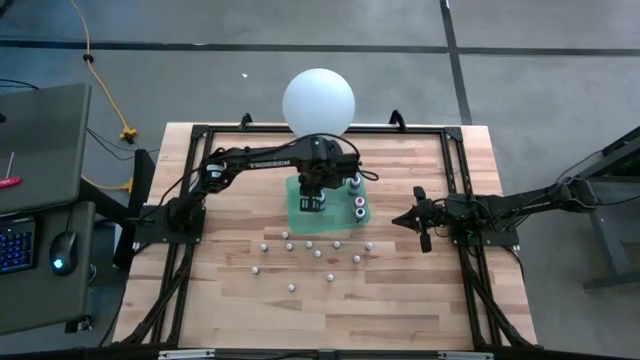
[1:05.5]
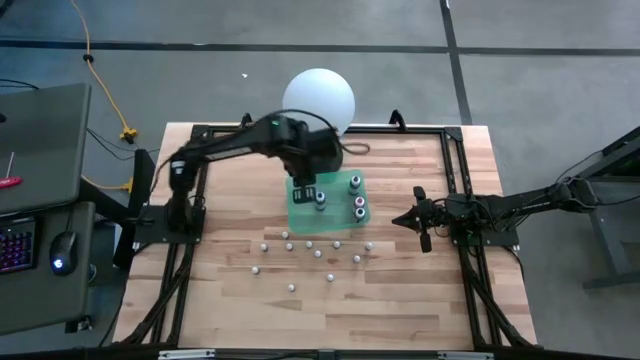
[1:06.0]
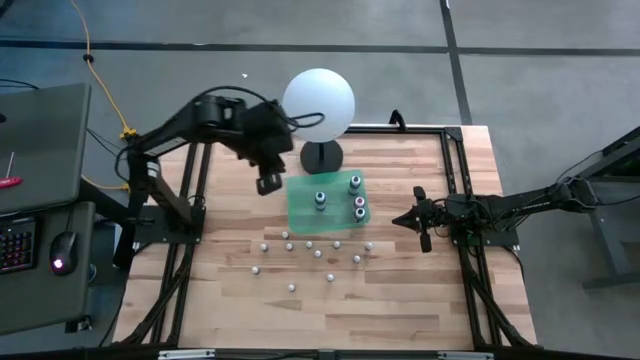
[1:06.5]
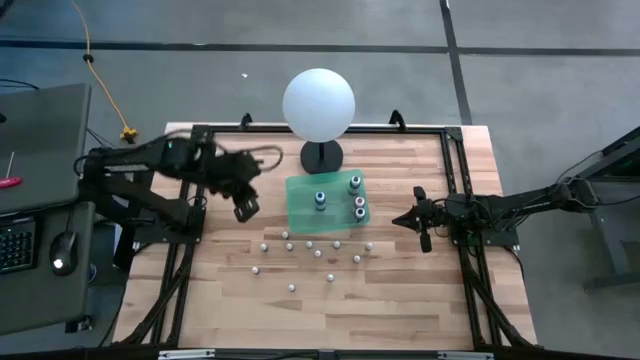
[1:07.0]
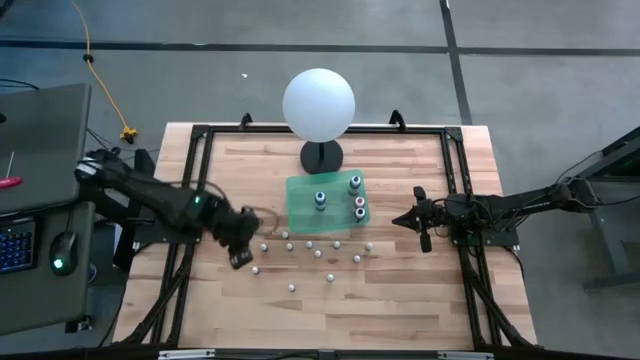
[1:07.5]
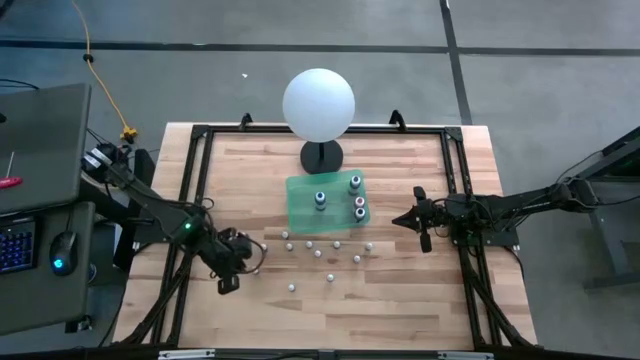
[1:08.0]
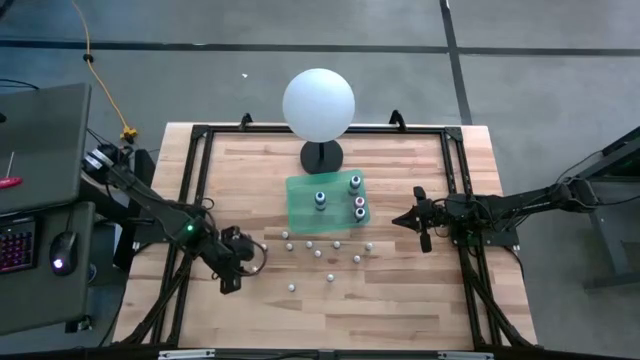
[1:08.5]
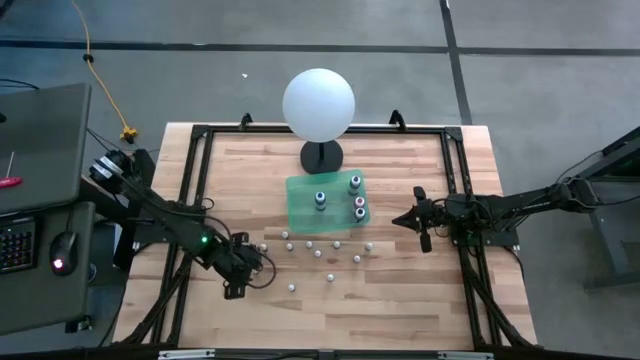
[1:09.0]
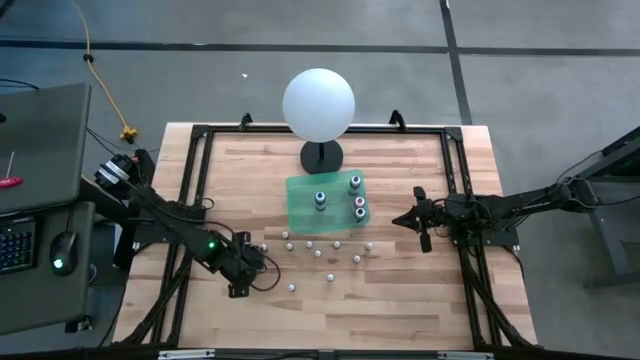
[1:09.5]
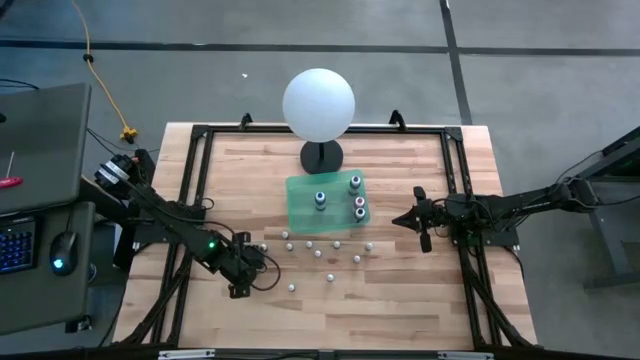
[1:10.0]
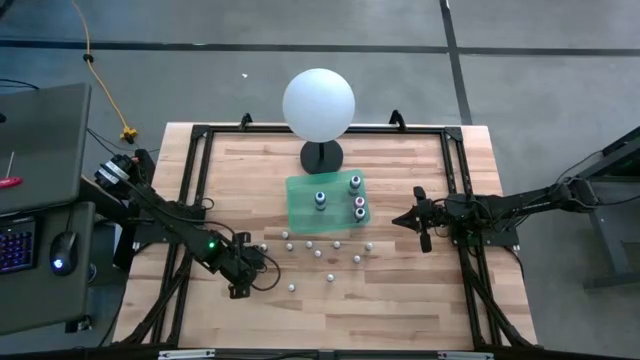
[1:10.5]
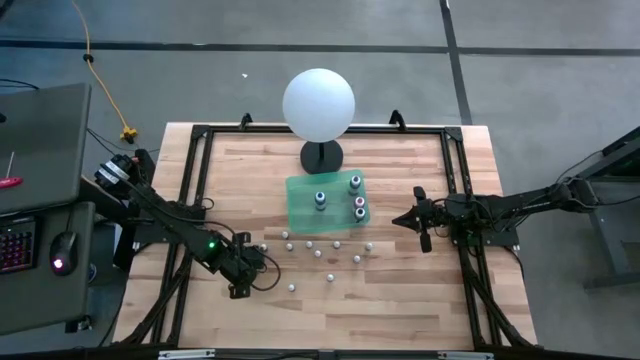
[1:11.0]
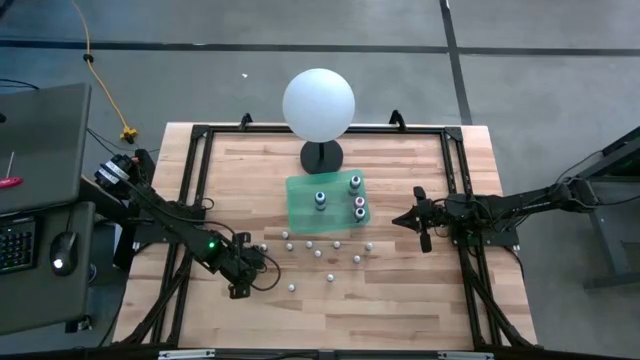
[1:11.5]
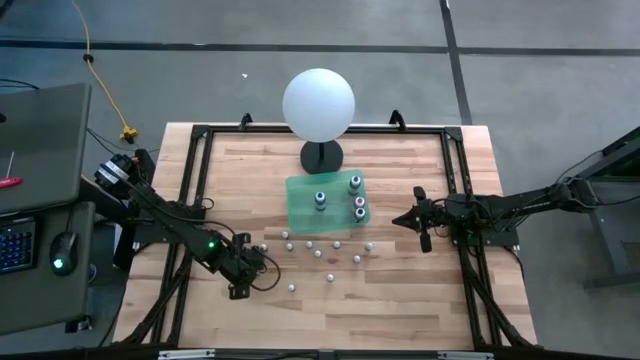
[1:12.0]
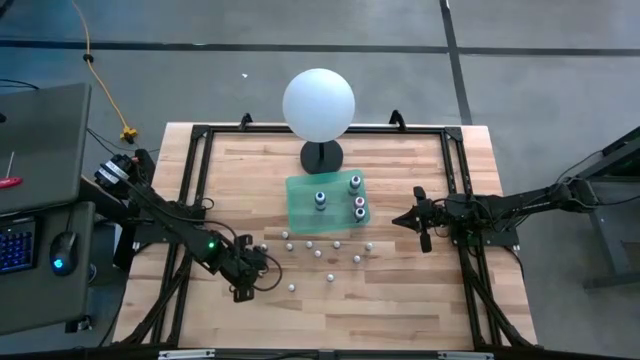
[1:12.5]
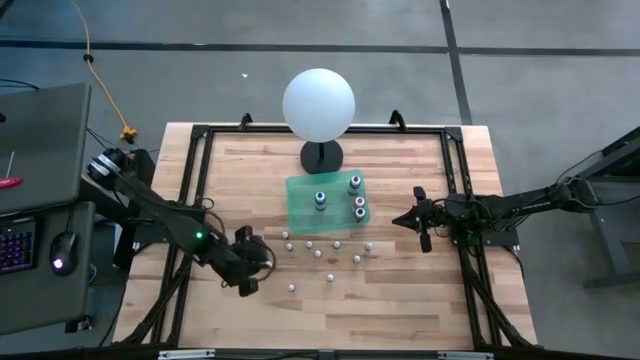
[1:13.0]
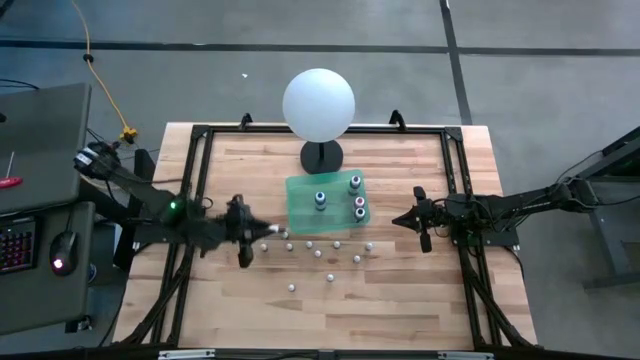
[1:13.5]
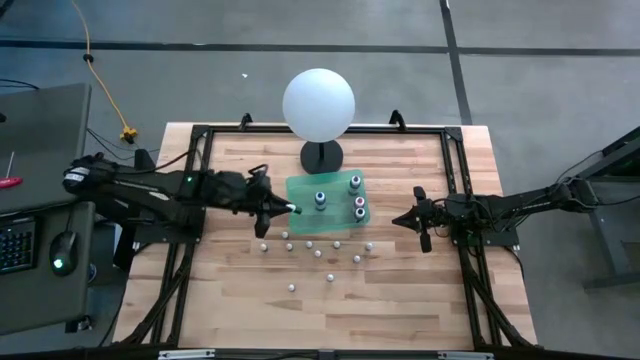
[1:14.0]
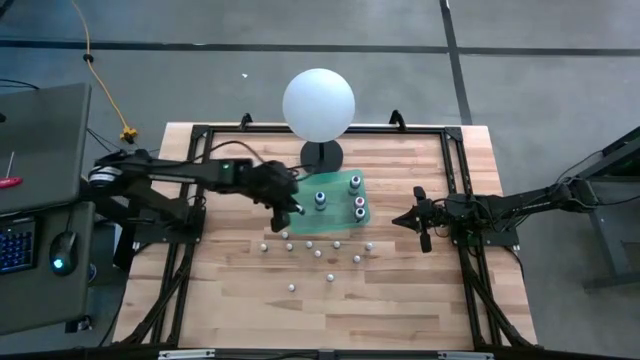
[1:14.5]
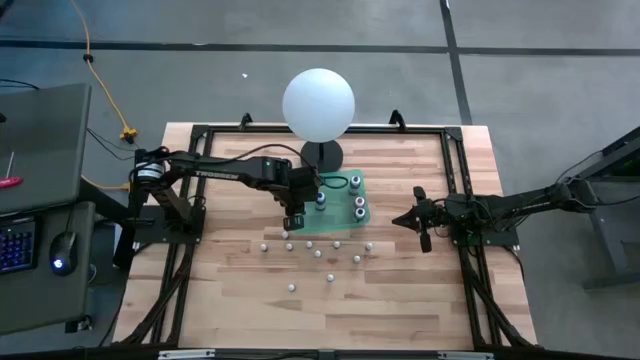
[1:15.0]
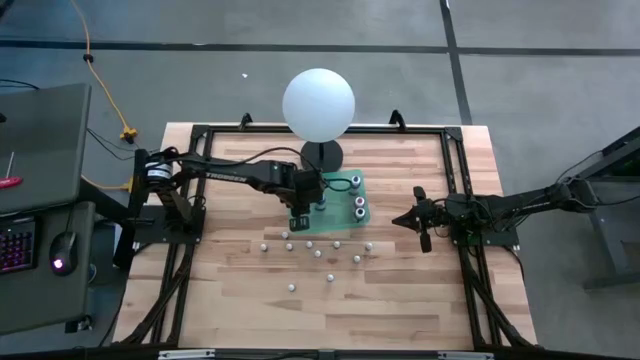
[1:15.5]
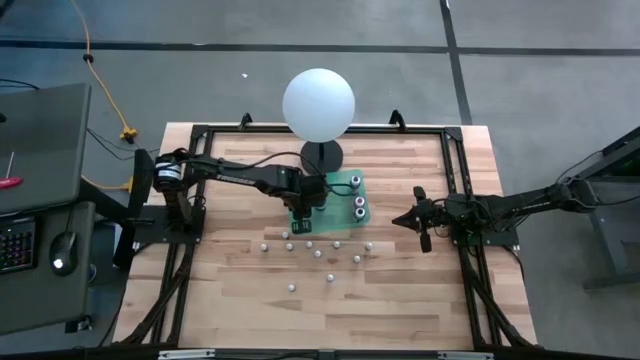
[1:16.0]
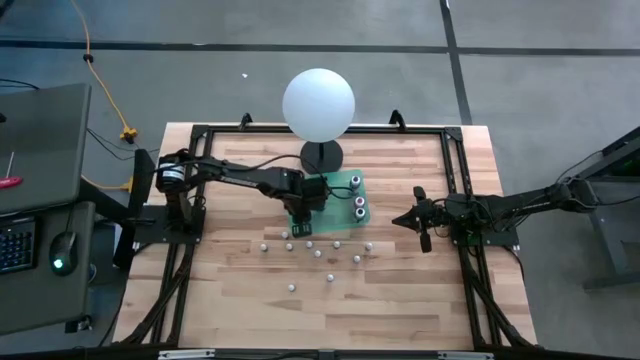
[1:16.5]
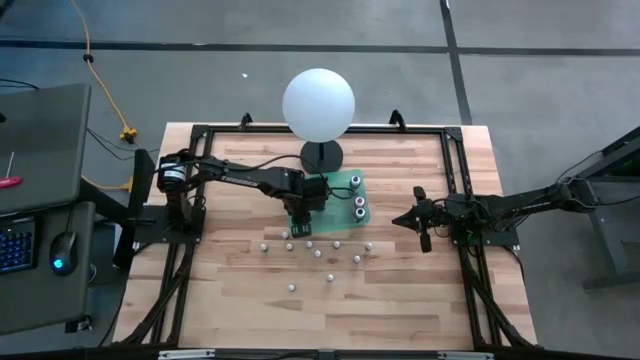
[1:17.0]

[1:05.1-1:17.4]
Task: Pick & Place food coloring
Put the bottom left small green food coloring bottle into the bin

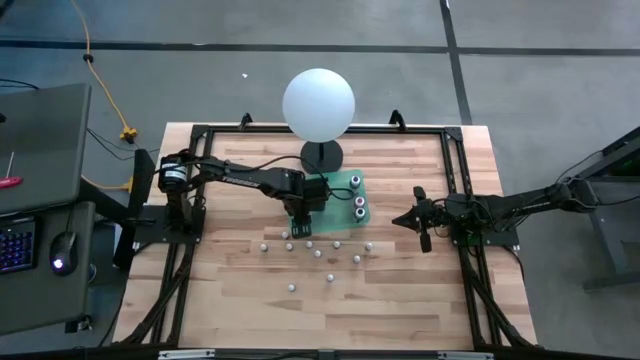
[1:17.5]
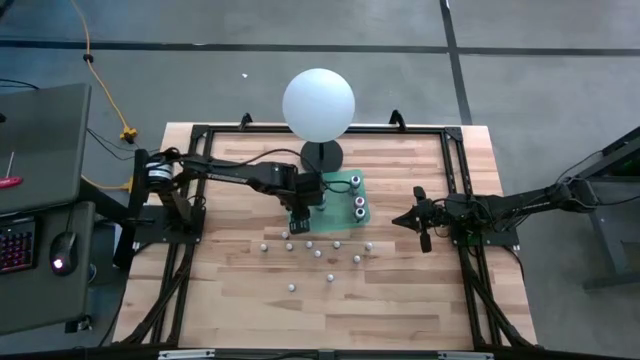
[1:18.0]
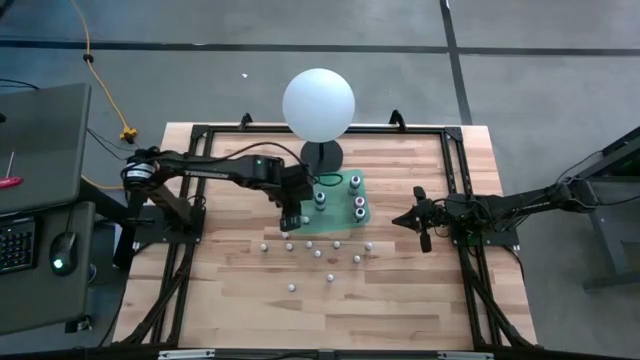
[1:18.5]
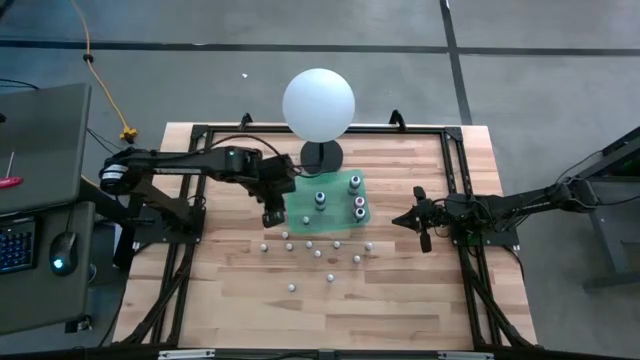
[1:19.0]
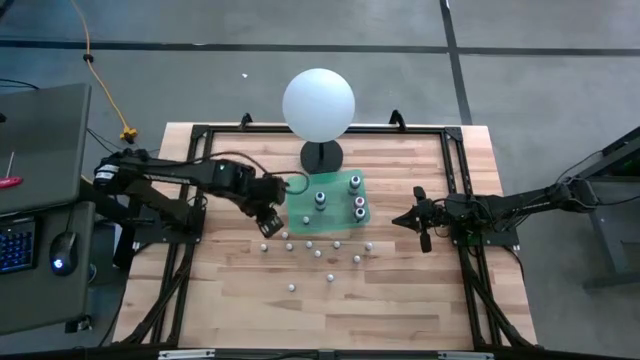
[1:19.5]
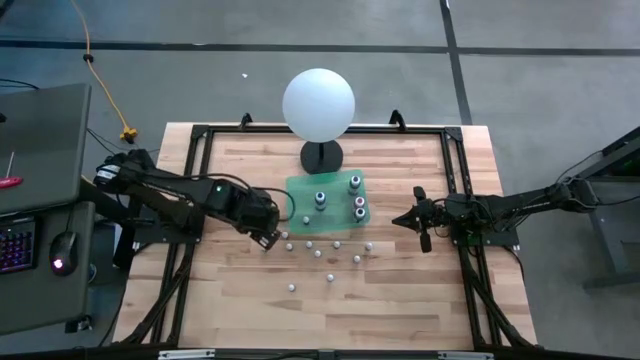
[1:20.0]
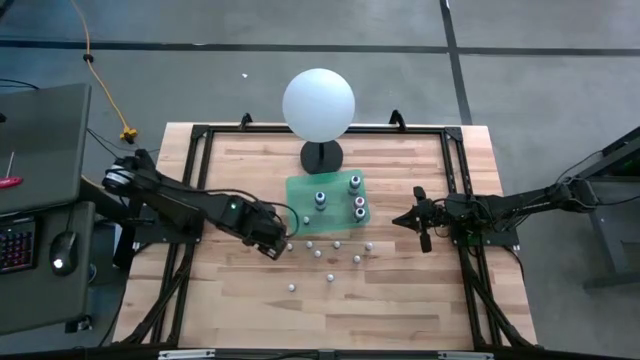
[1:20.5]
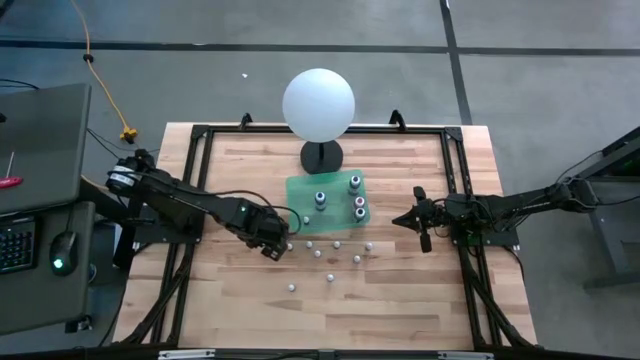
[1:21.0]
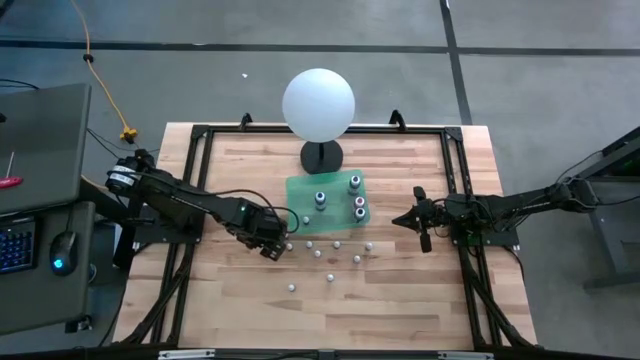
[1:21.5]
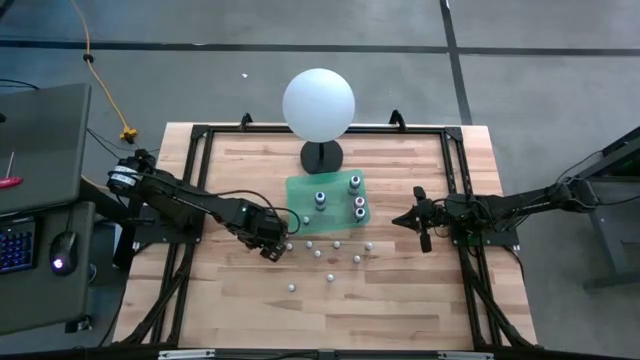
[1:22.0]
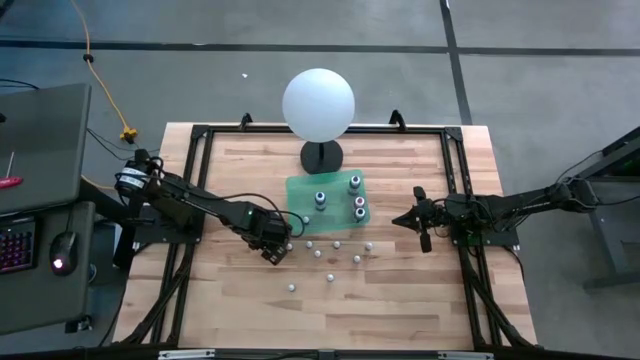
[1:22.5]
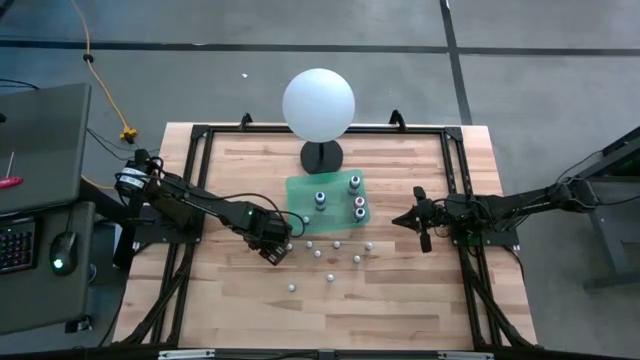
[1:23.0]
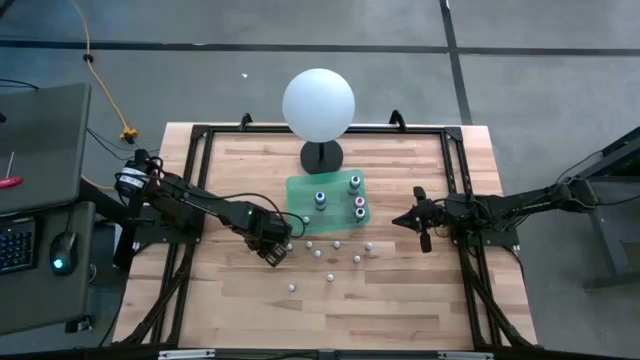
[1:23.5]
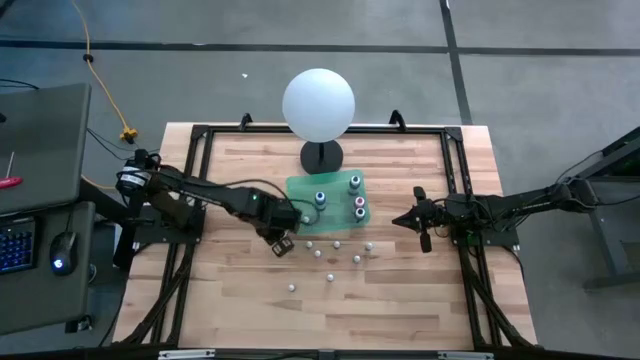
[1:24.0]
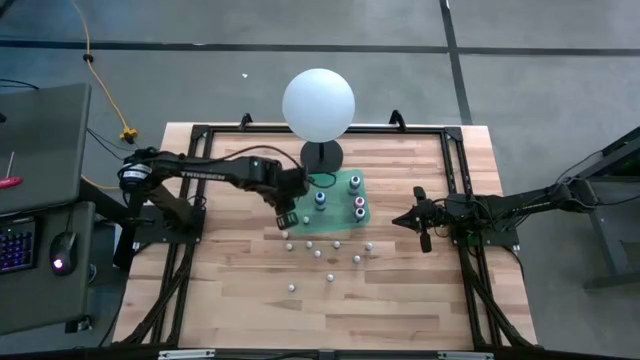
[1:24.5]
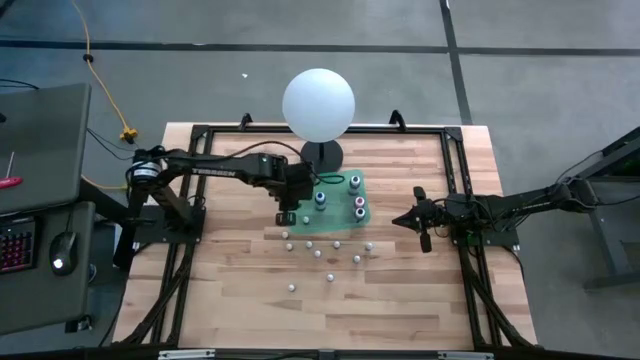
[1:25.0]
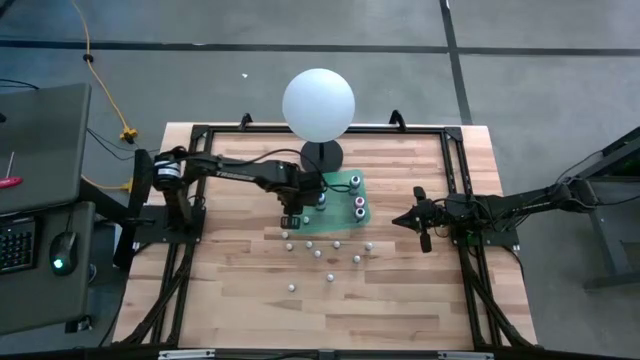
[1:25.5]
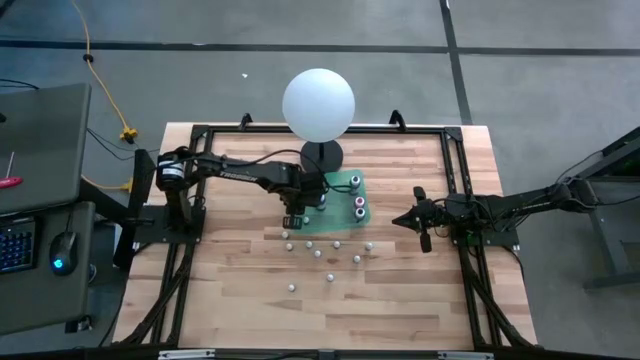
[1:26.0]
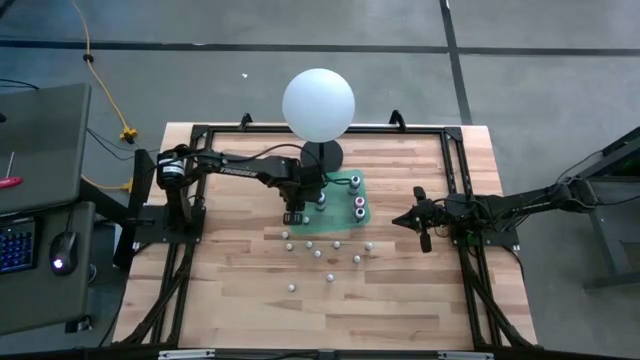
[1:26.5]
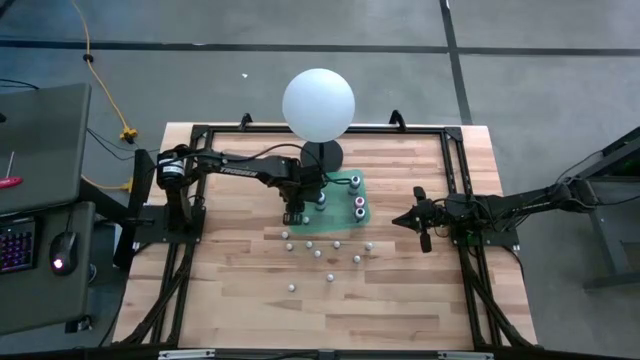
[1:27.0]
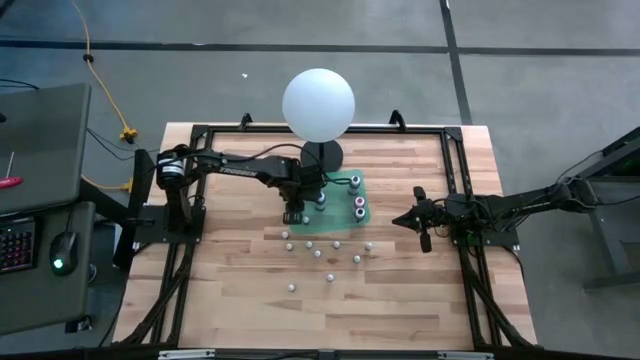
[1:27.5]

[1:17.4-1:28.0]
Put the small brown food coloring bottle into the bin
